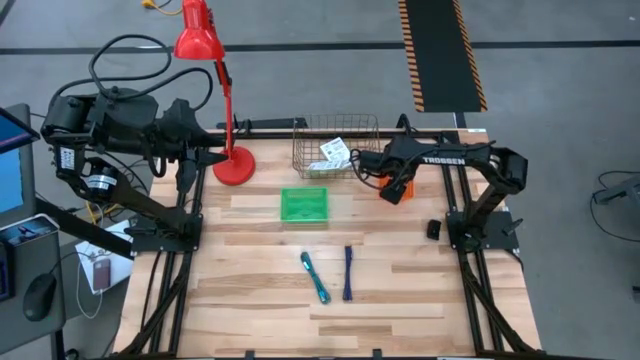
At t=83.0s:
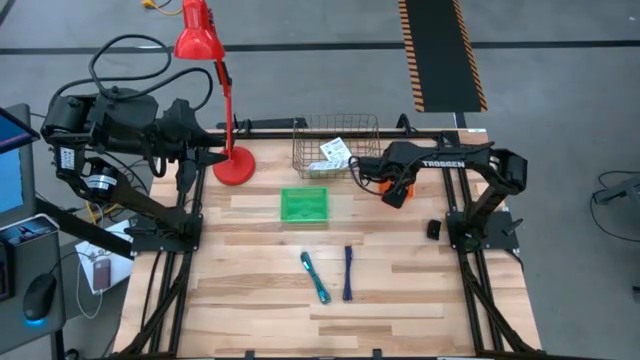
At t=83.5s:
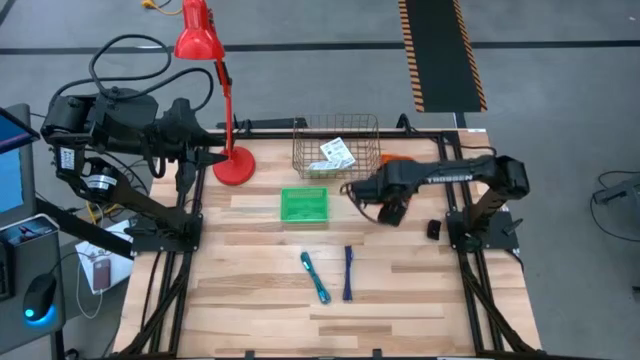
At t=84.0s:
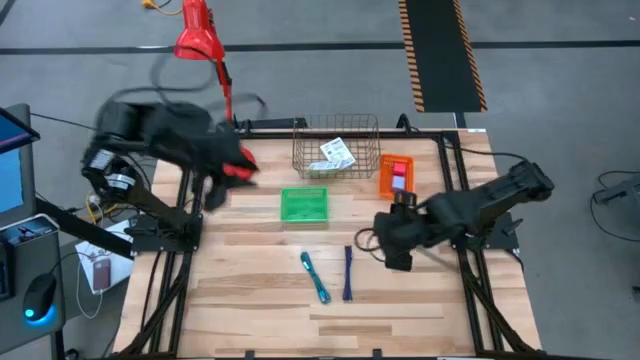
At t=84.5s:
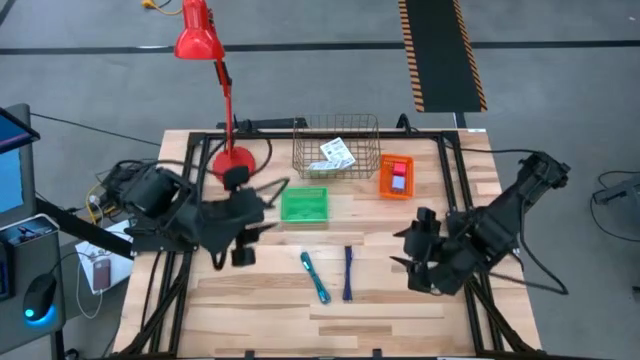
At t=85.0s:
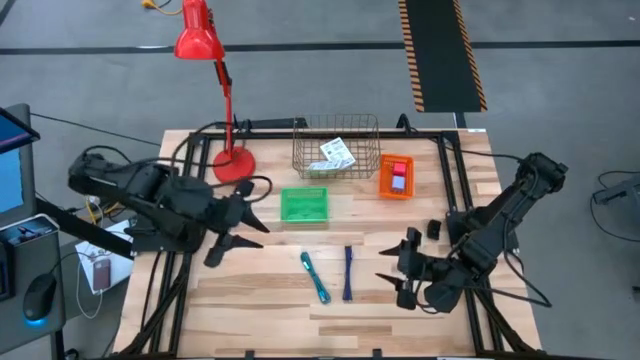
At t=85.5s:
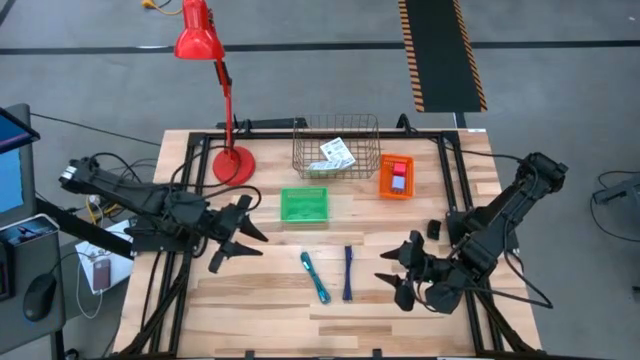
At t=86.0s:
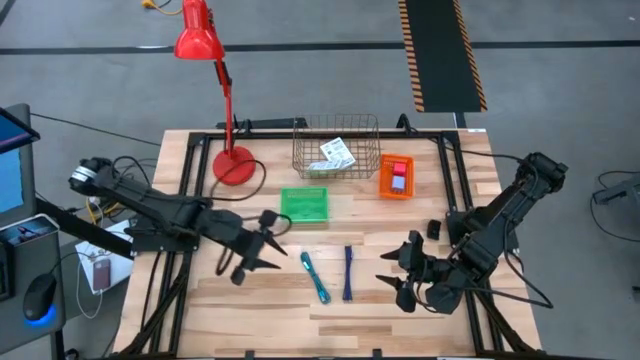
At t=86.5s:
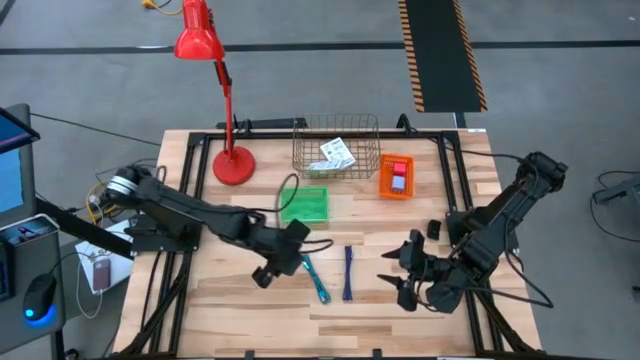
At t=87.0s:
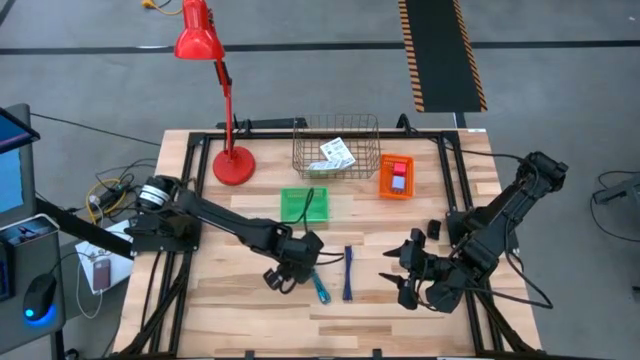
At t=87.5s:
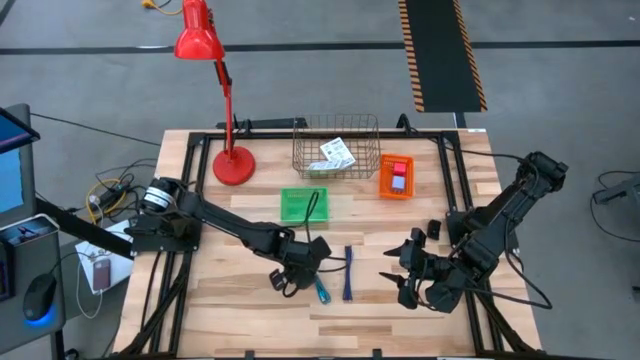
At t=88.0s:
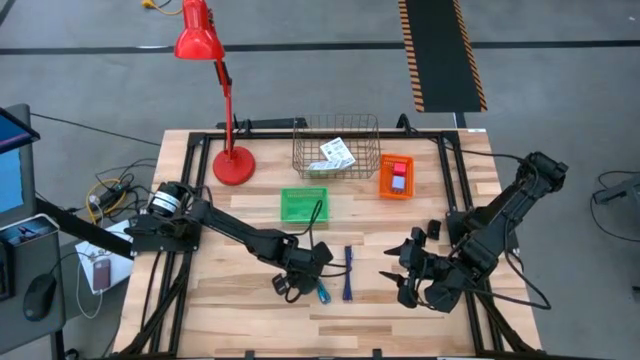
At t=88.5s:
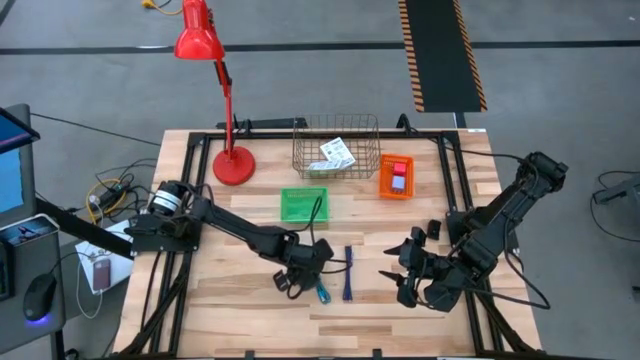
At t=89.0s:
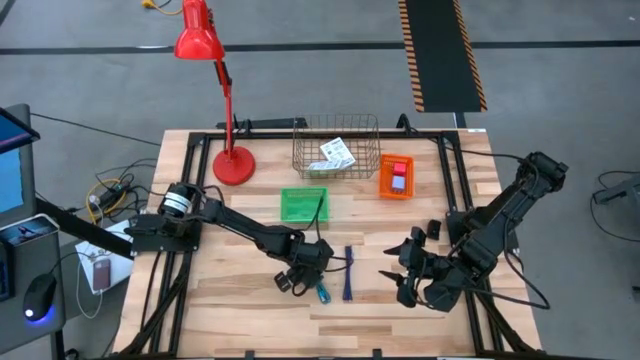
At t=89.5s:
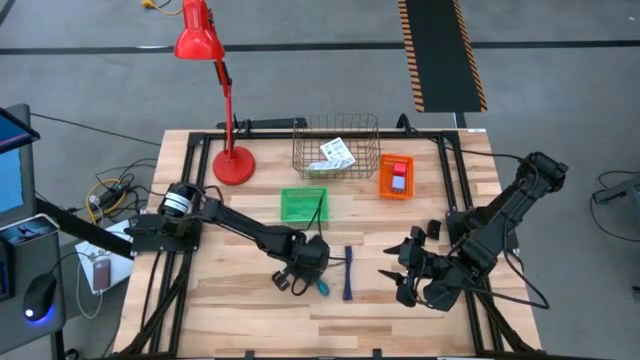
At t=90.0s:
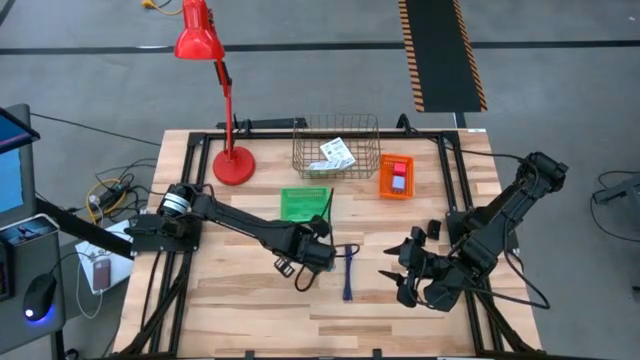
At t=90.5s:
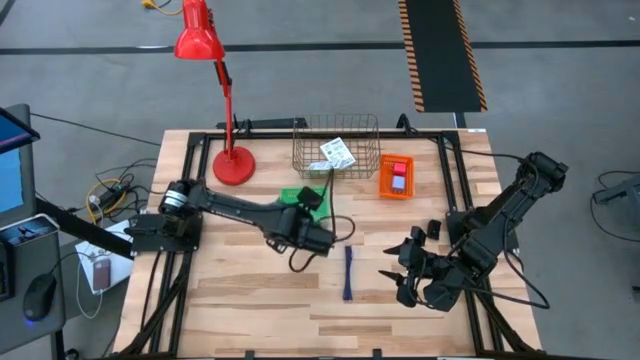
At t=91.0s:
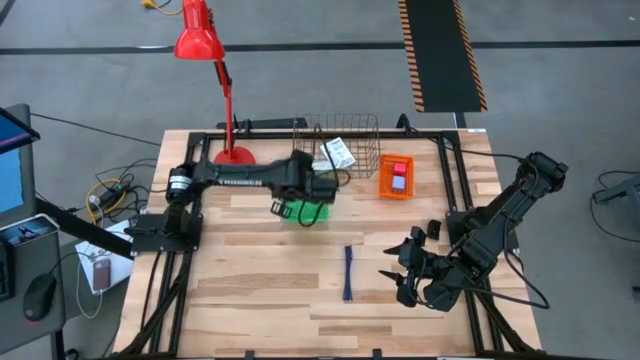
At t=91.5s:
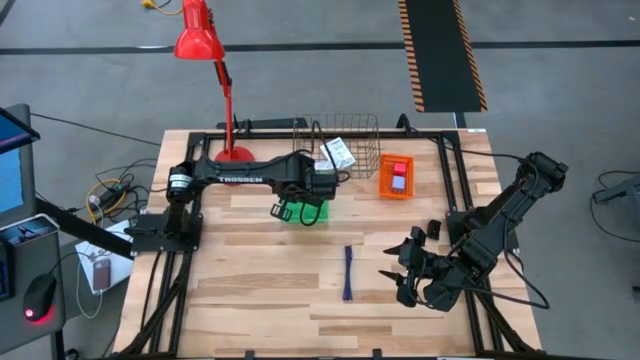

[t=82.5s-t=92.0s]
Task: Pick and place items into bin
Put the blue charger cable into the green bin

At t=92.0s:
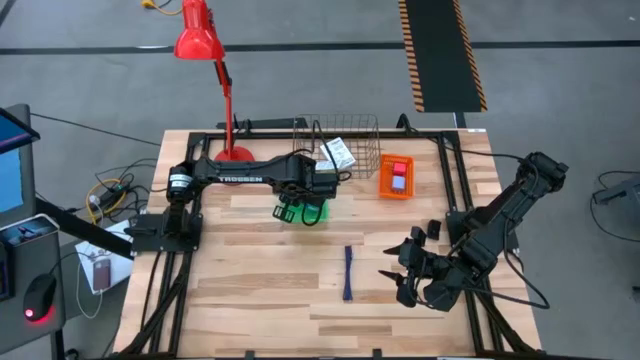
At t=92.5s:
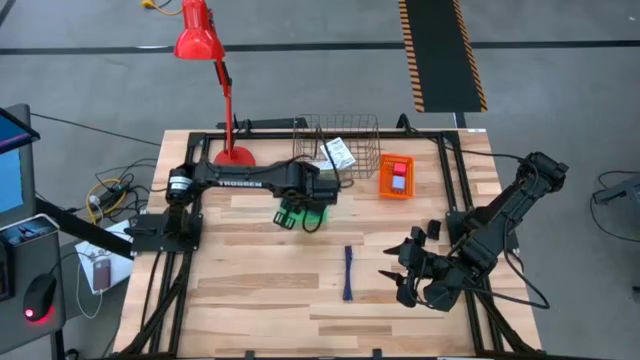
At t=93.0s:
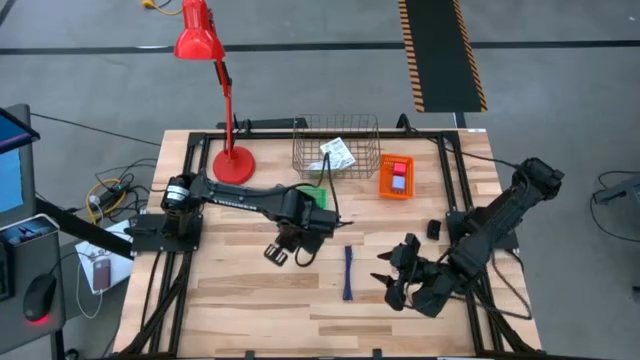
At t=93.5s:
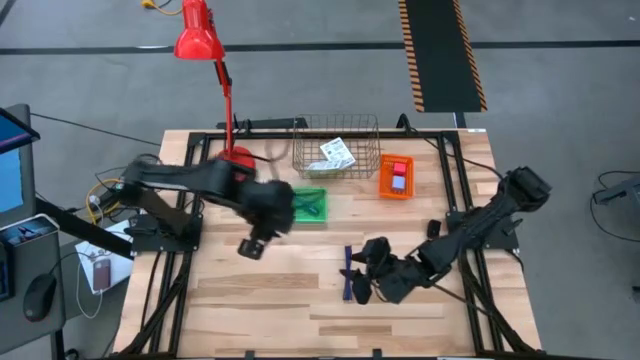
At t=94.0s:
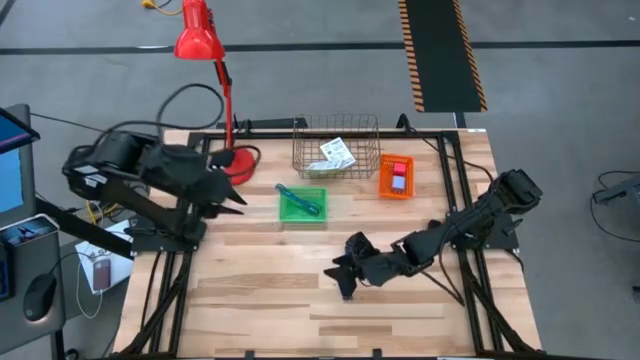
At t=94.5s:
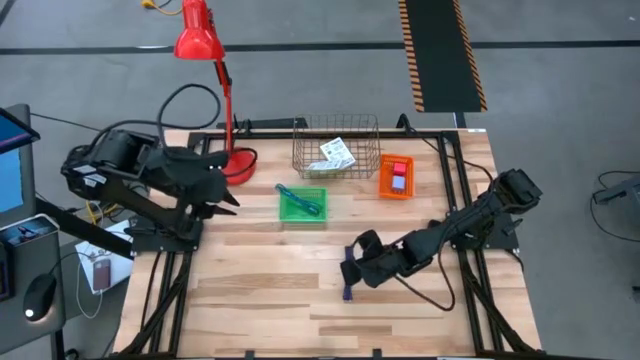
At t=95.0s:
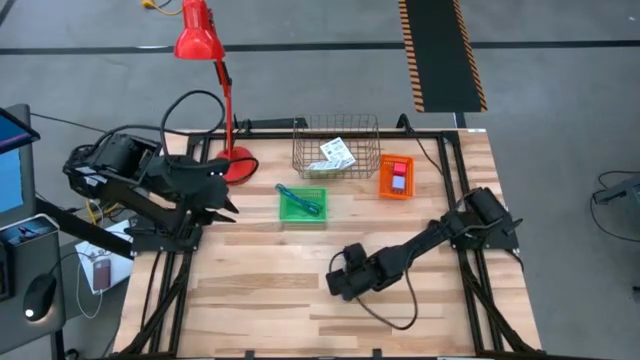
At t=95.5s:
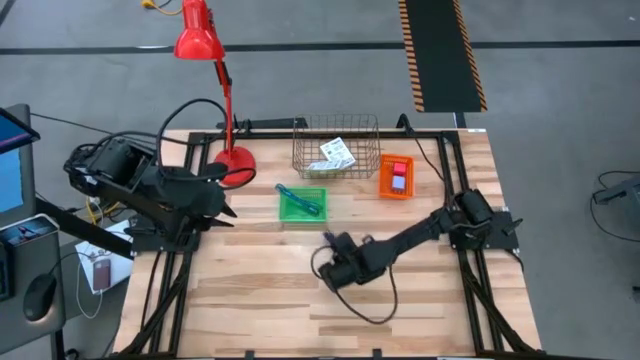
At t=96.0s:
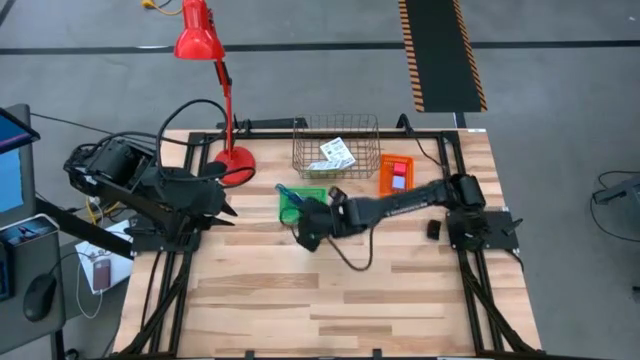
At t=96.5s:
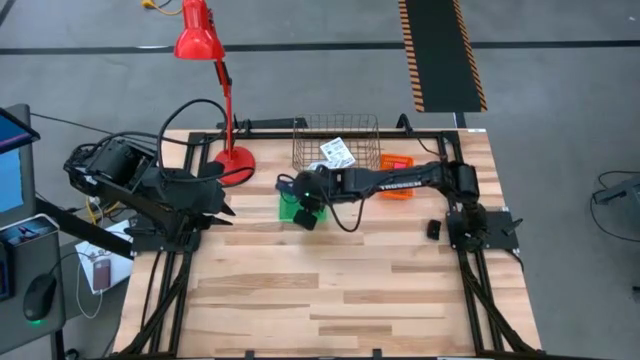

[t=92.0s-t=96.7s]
Put the dark blue charger cable into the green bin

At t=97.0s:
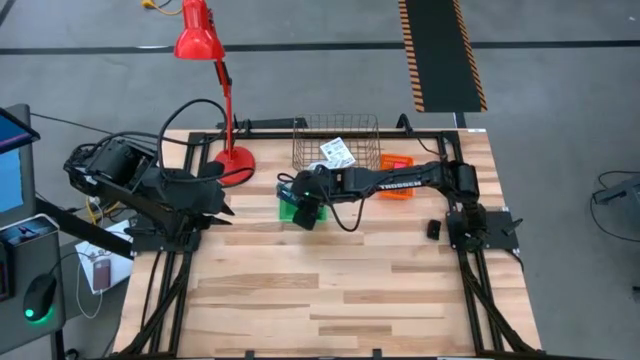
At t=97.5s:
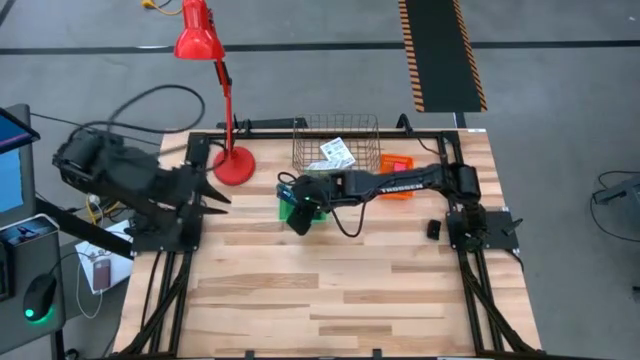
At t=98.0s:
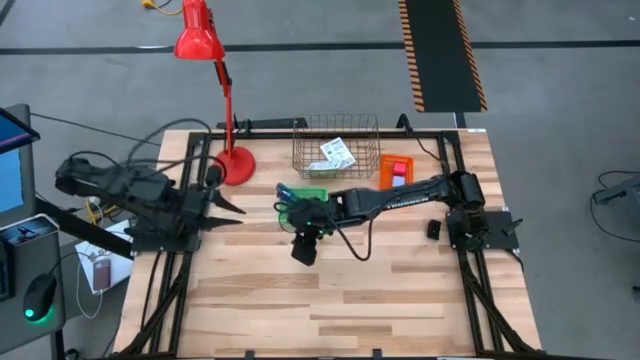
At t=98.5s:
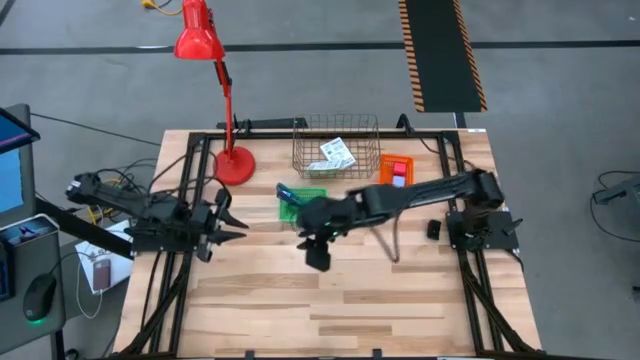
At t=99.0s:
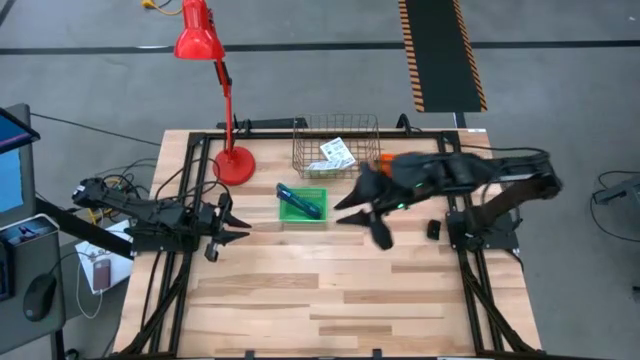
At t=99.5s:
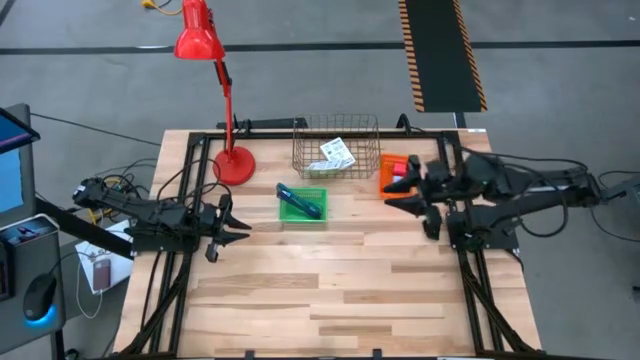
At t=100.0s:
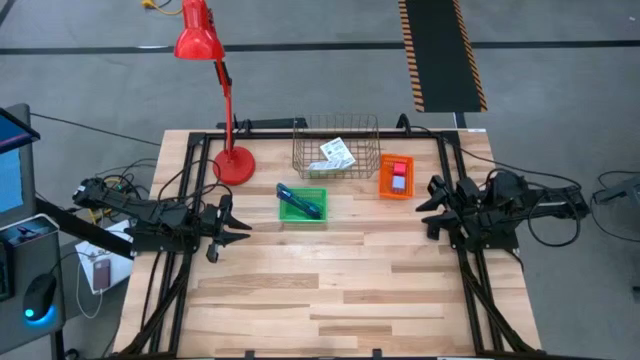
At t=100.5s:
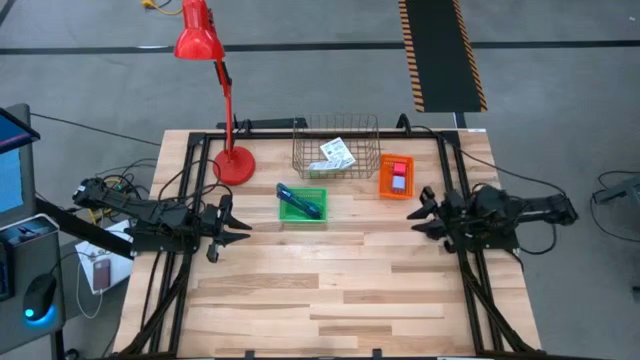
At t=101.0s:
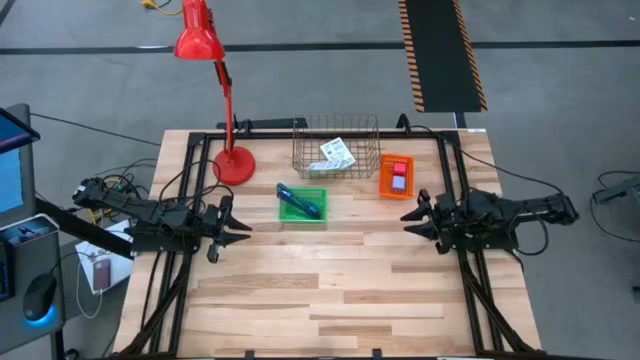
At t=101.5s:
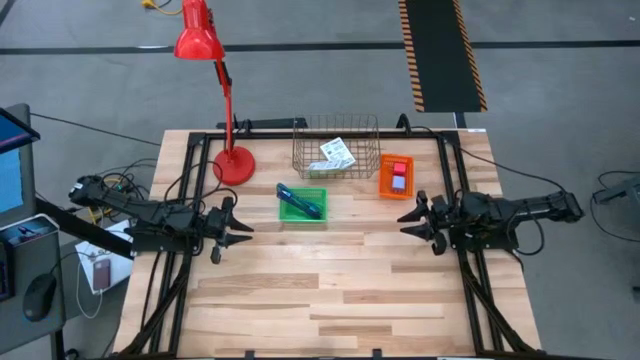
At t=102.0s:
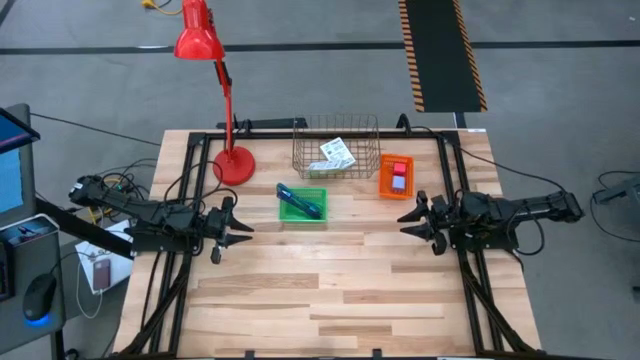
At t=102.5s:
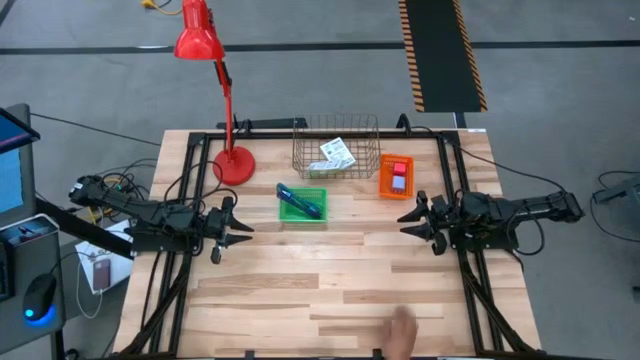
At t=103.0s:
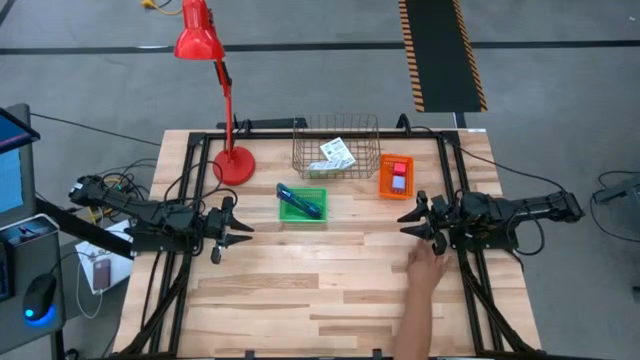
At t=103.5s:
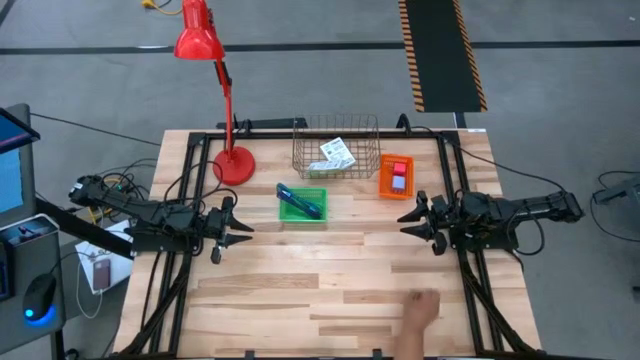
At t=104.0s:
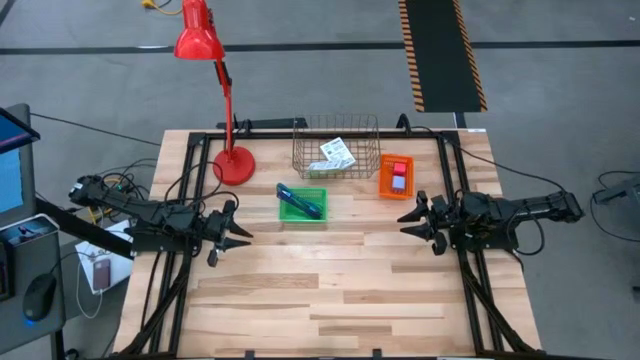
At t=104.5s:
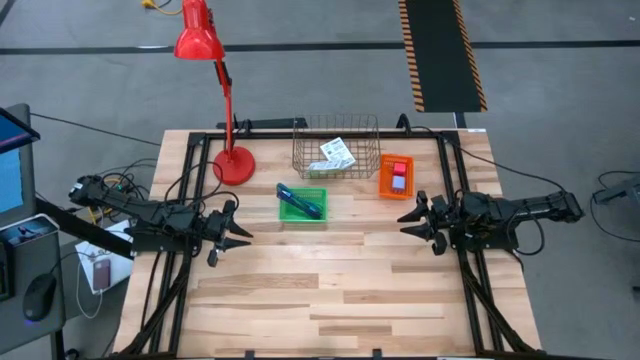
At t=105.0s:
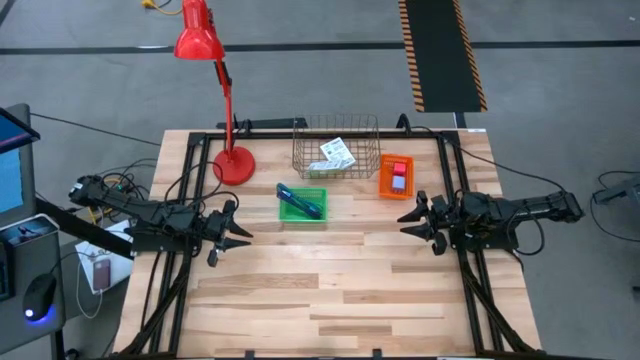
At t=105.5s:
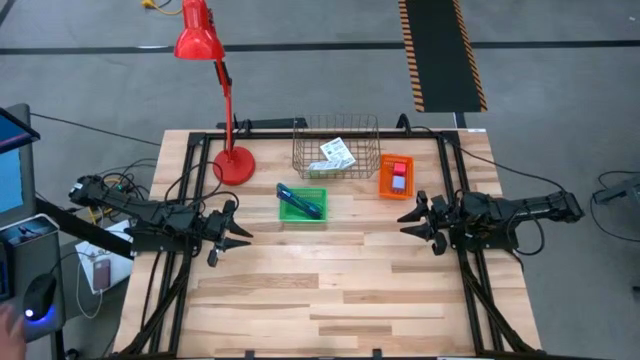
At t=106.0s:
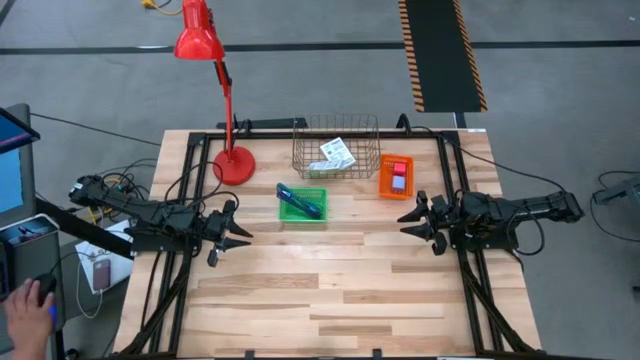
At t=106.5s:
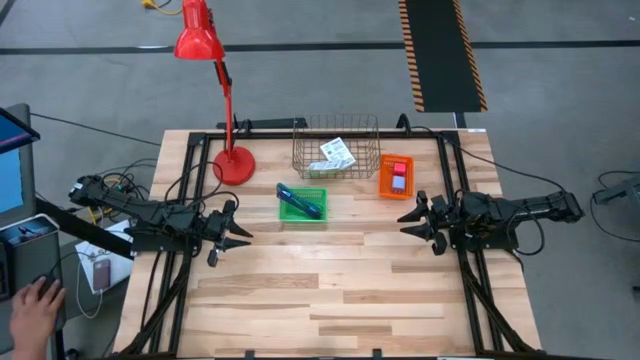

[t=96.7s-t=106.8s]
Return to Home Position
